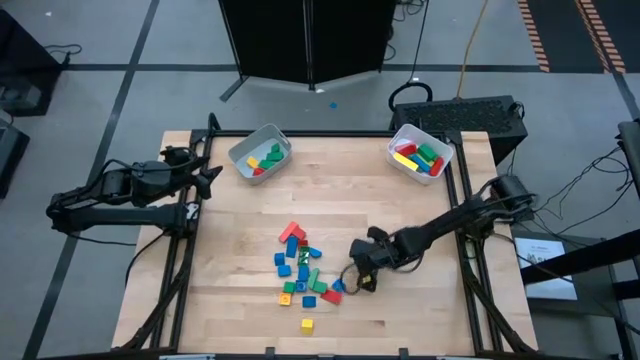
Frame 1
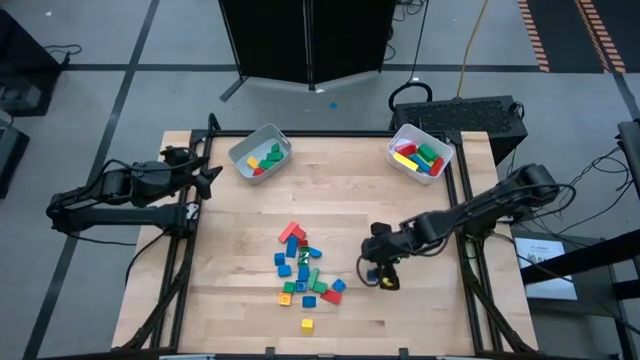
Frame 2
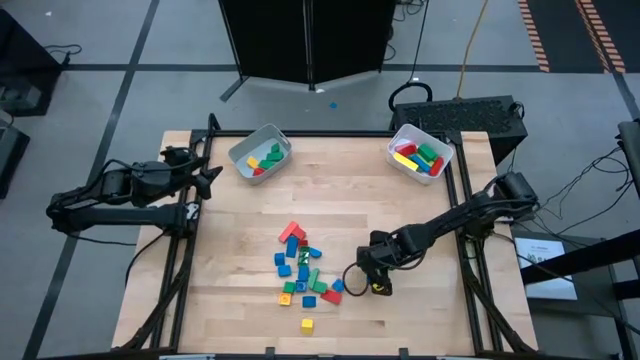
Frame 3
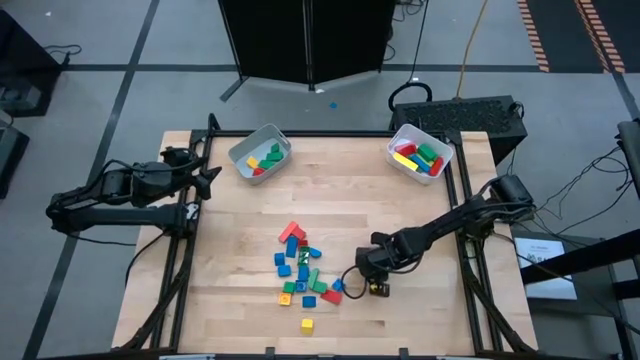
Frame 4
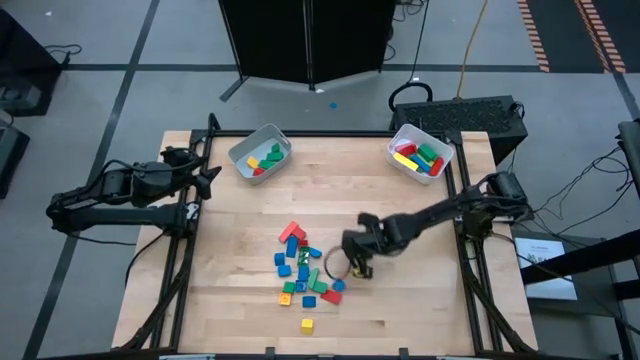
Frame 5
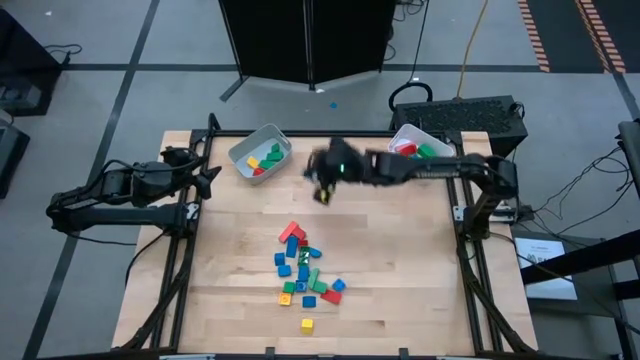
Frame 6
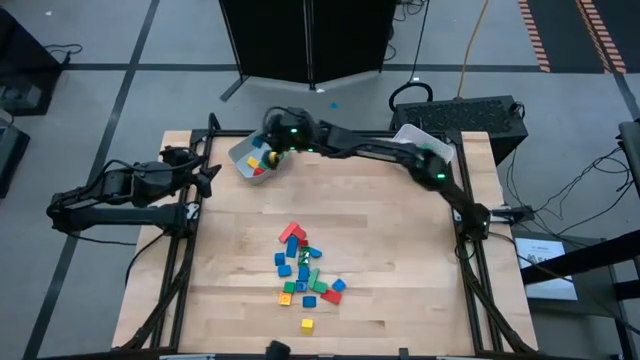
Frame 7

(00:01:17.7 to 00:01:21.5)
Task: Sort blocks by size
Put the triangular blue block into the gray bin

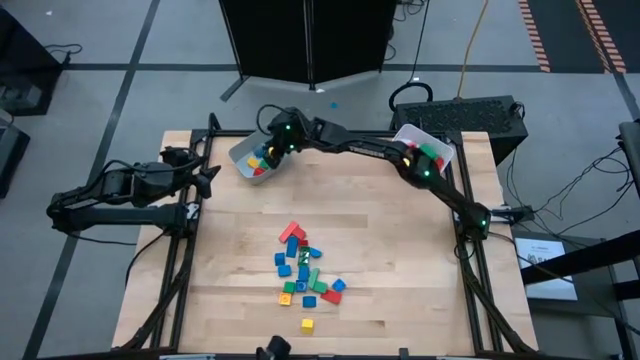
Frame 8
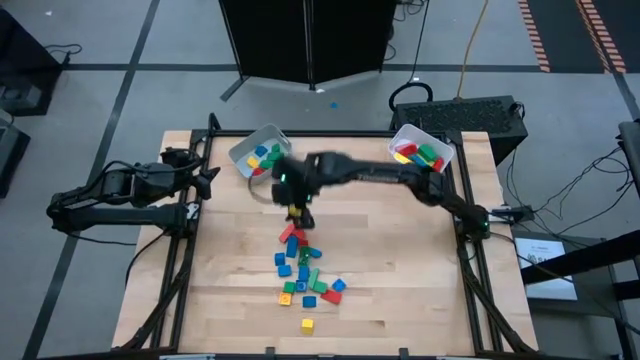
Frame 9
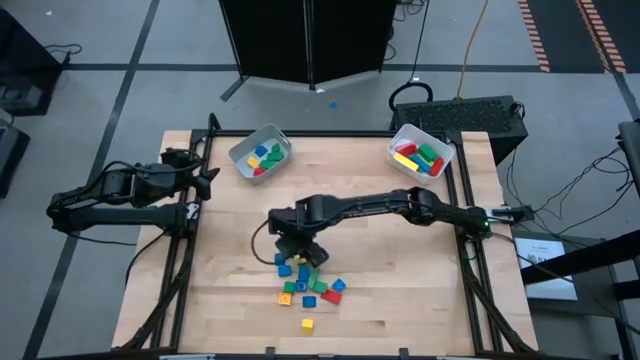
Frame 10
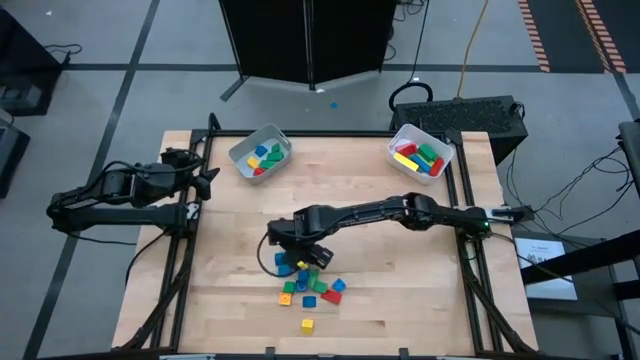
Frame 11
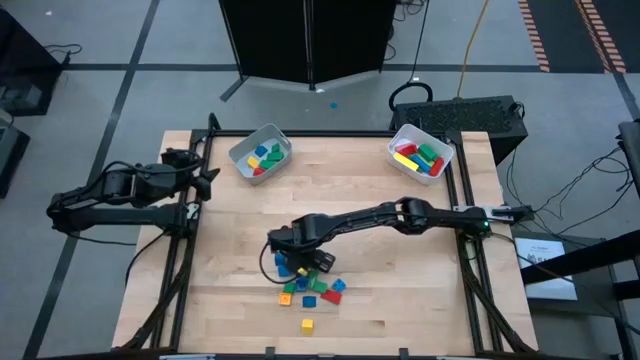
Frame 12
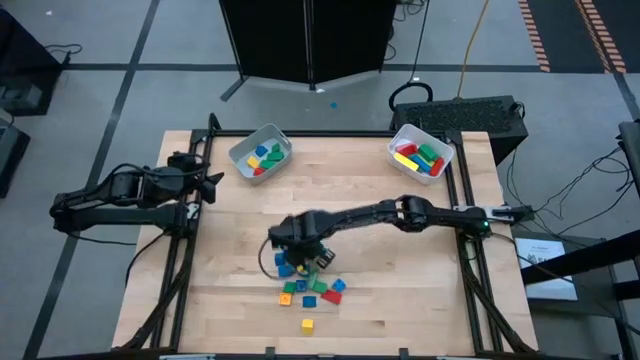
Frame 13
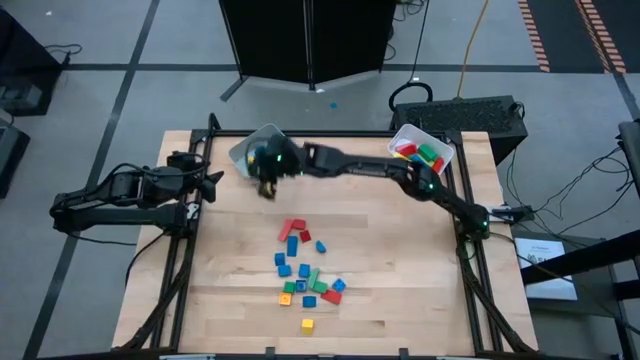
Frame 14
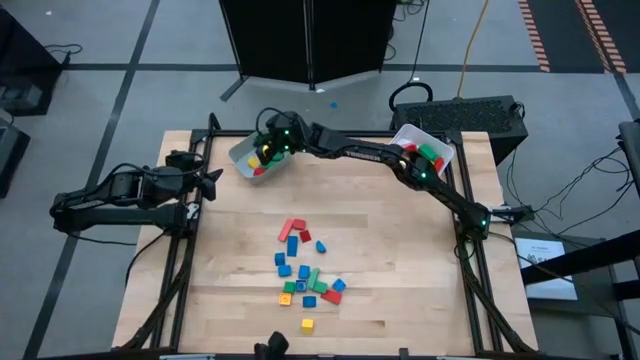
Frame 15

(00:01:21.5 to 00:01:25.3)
Put the 6 stud green game piece into the gray bin

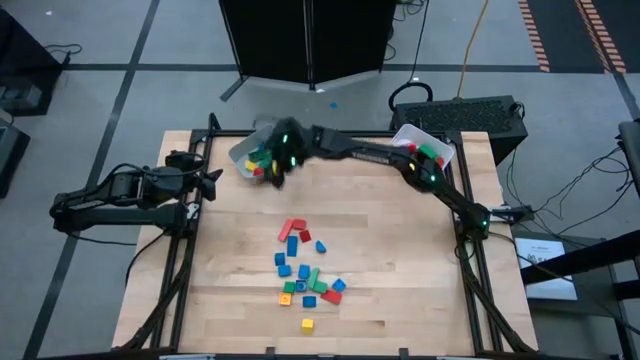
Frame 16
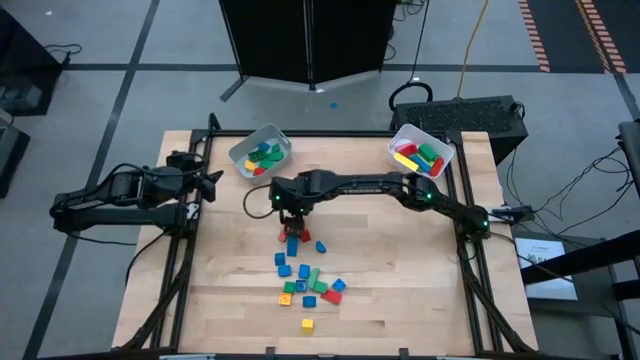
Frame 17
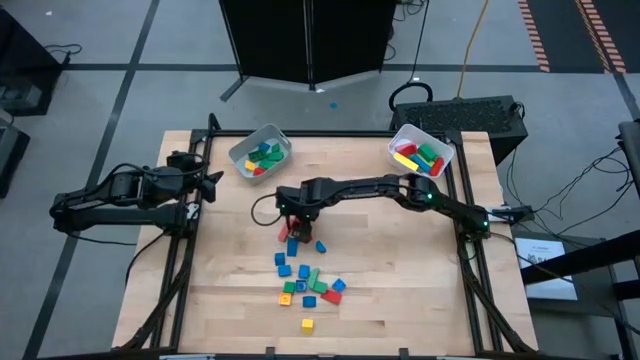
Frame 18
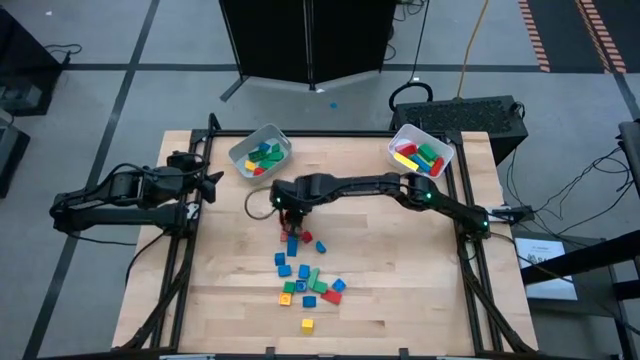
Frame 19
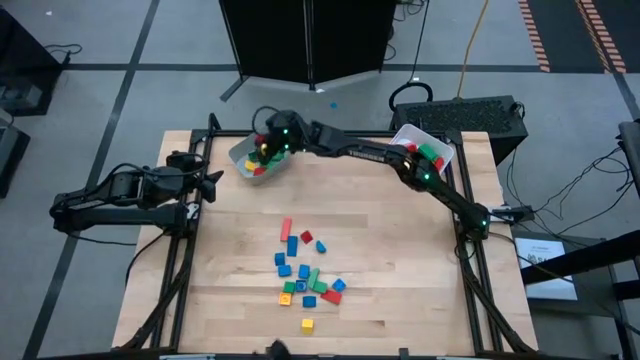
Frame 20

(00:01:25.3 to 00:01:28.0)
Put the triangular red block into the gray bin

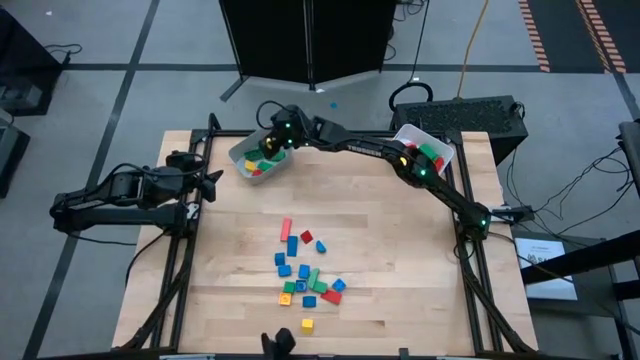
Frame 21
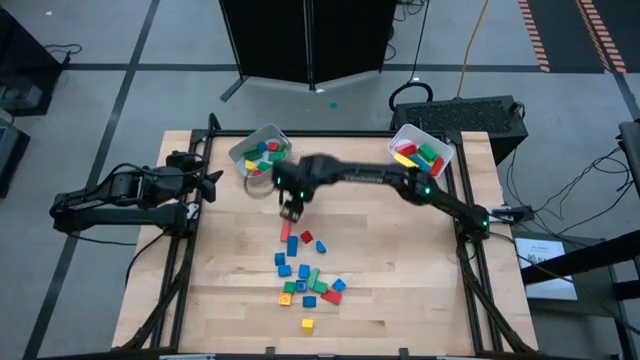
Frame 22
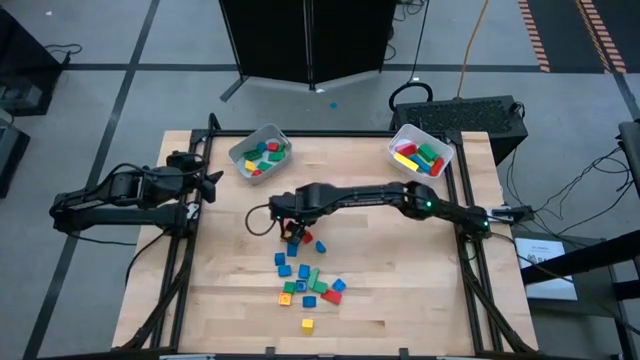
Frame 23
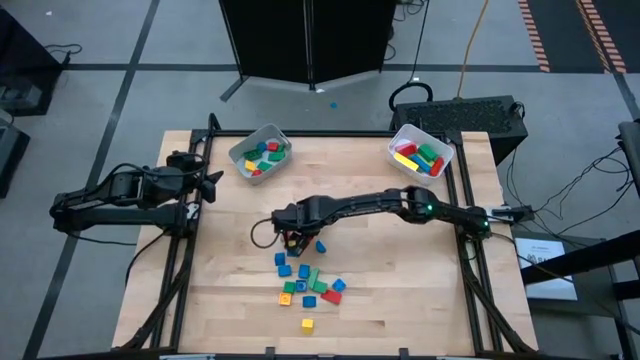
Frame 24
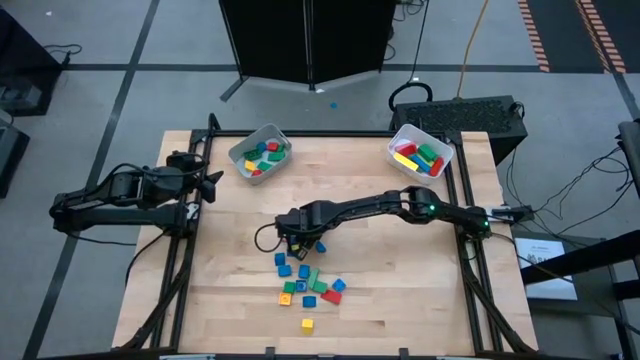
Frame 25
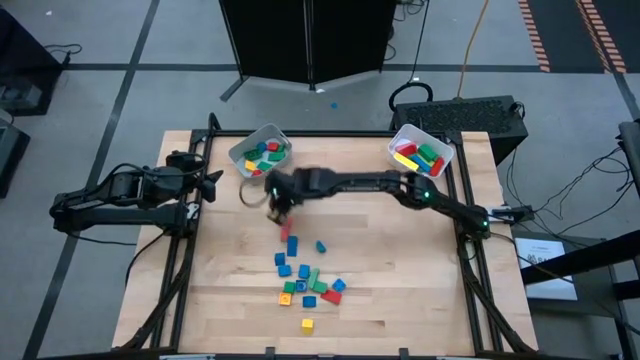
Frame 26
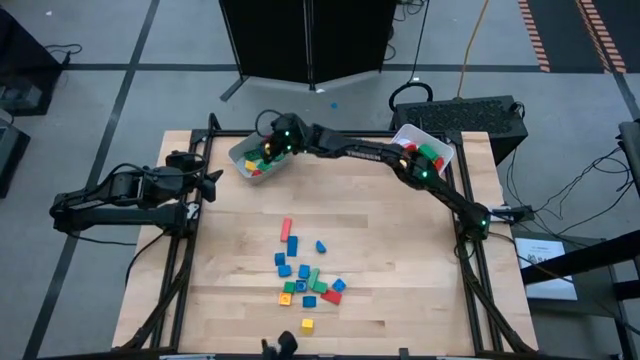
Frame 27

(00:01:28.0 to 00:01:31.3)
Put the triangular red block into the gray bin

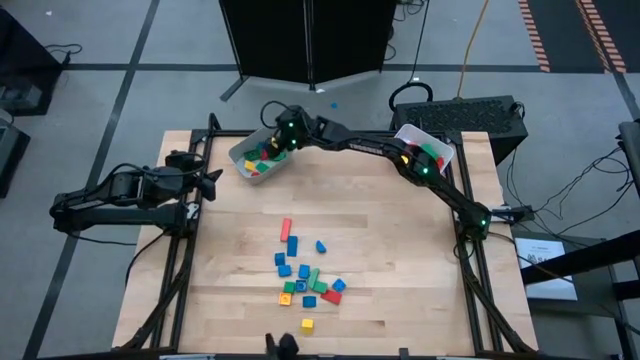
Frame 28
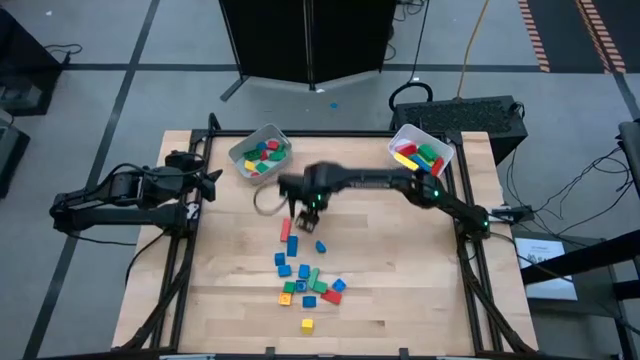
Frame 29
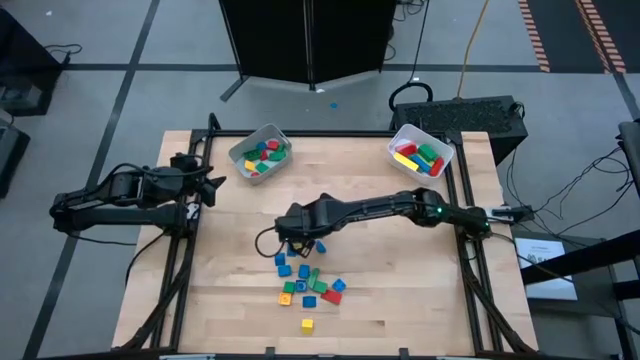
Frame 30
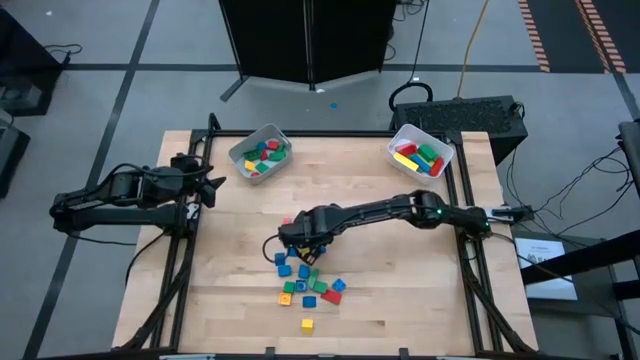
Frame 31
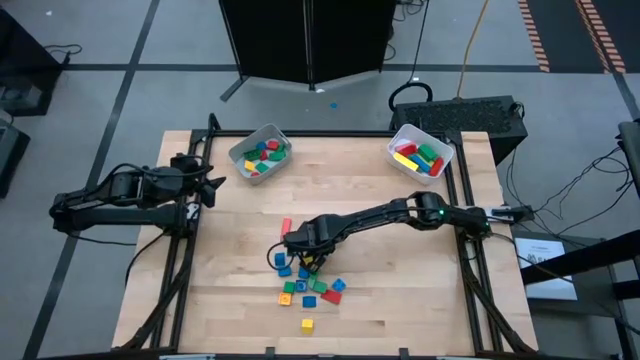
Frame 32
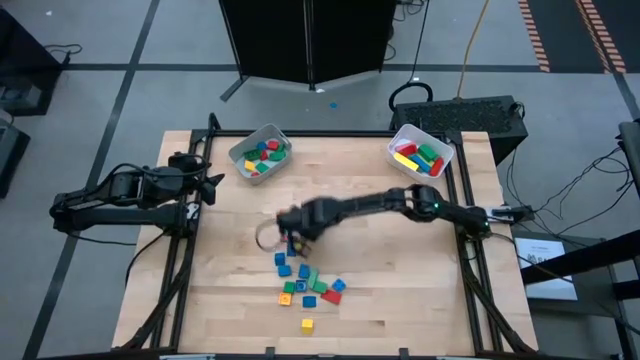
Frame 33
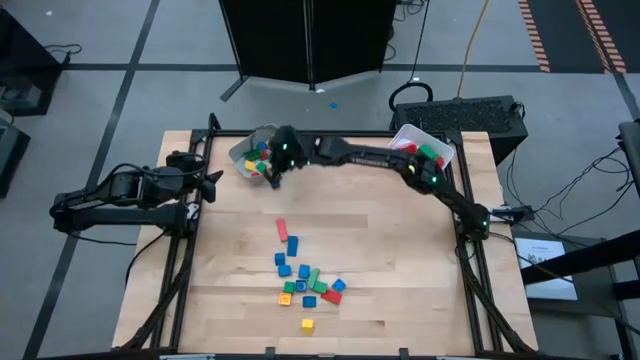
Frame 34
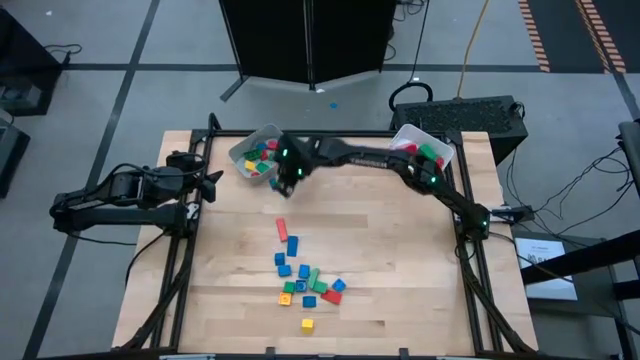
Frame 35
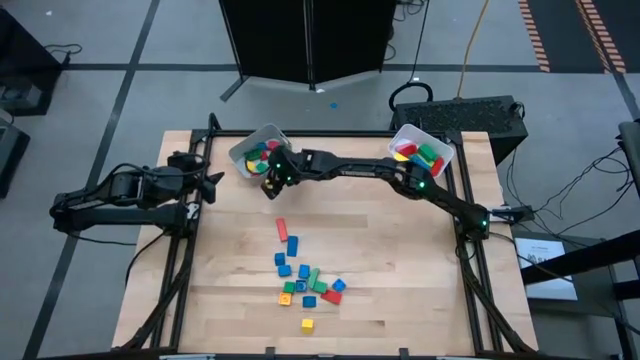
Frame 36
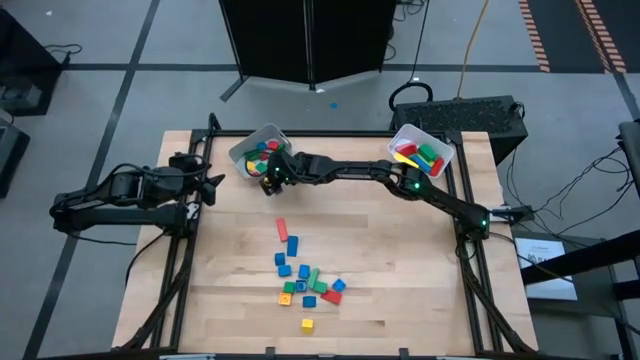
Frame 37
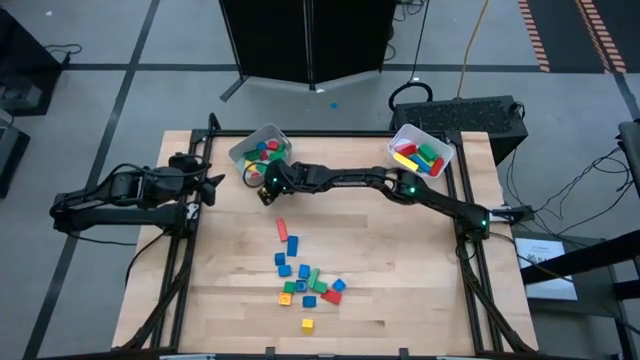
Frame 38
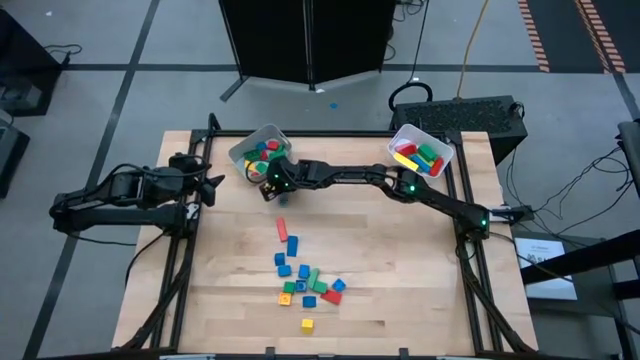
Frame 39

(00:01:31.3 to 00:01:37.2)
Put the half cylindrical blue block into the gray bin
